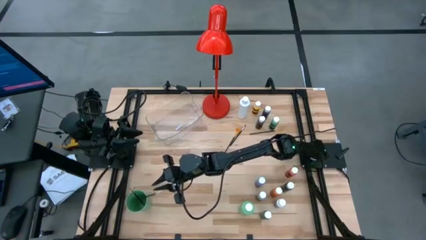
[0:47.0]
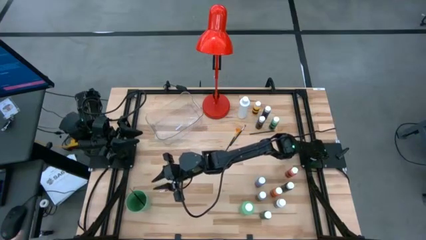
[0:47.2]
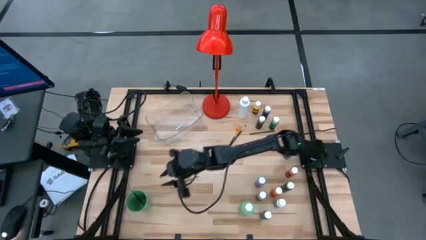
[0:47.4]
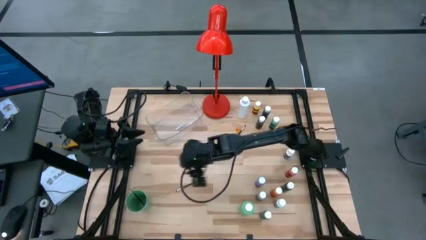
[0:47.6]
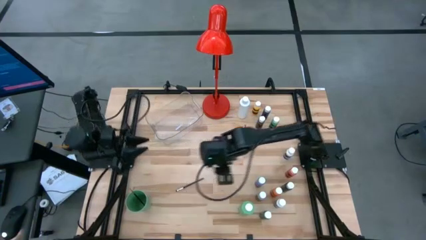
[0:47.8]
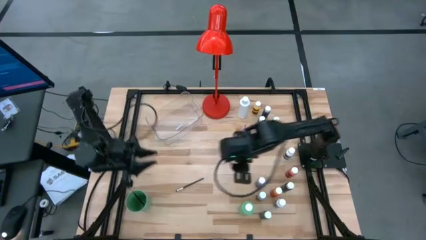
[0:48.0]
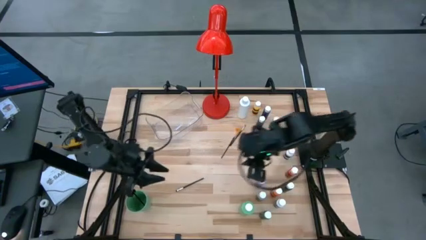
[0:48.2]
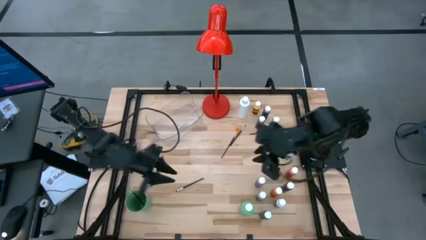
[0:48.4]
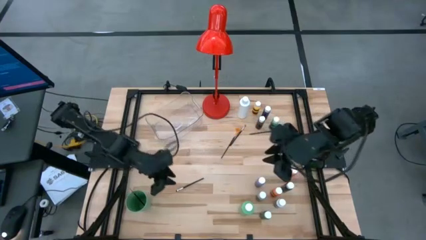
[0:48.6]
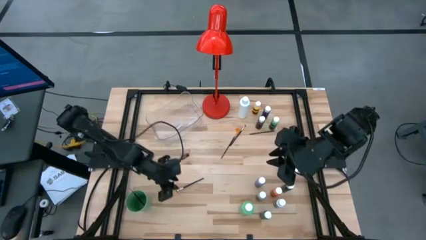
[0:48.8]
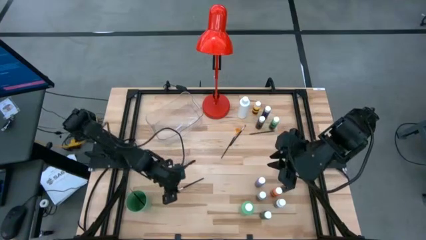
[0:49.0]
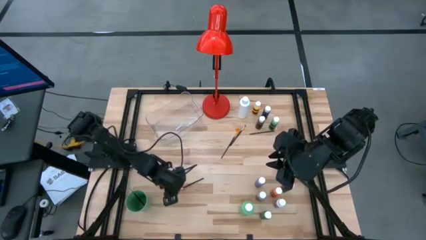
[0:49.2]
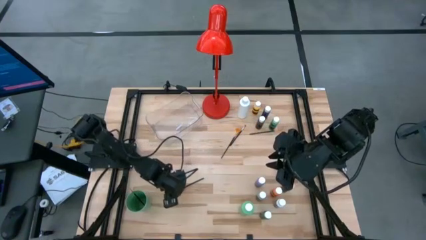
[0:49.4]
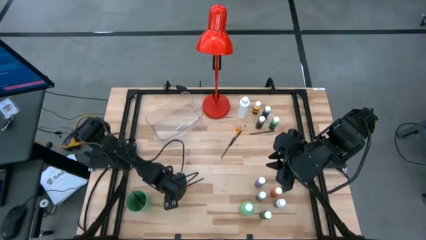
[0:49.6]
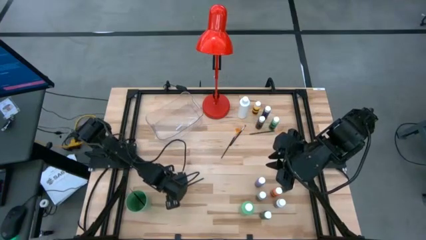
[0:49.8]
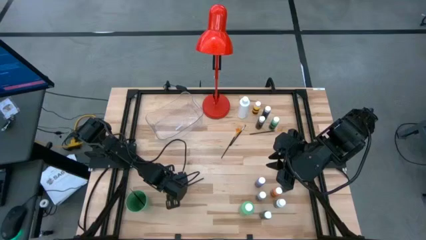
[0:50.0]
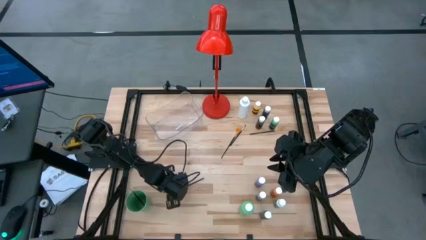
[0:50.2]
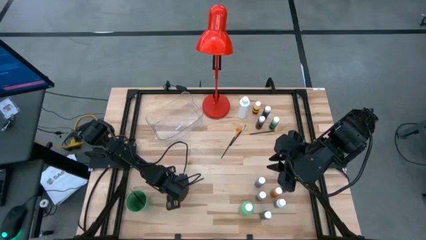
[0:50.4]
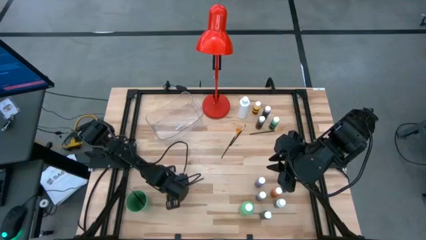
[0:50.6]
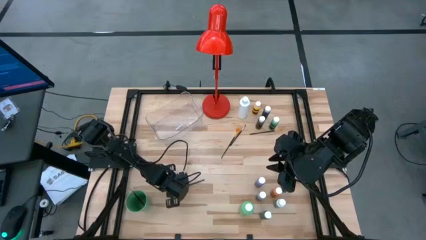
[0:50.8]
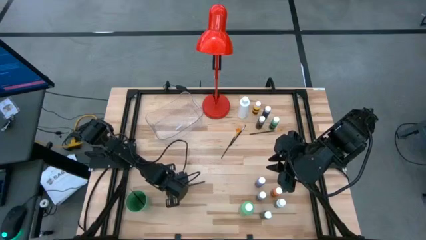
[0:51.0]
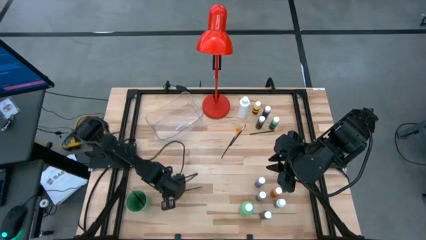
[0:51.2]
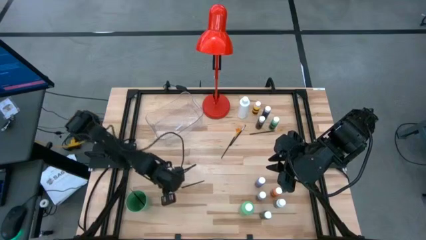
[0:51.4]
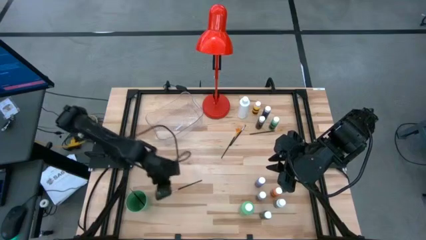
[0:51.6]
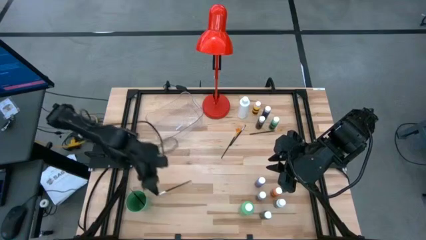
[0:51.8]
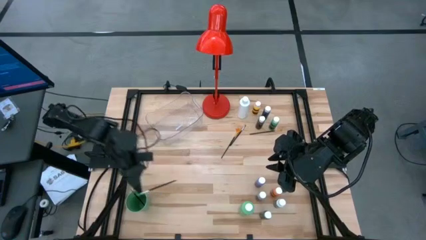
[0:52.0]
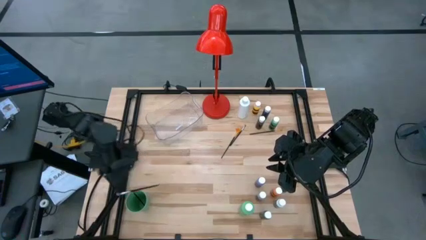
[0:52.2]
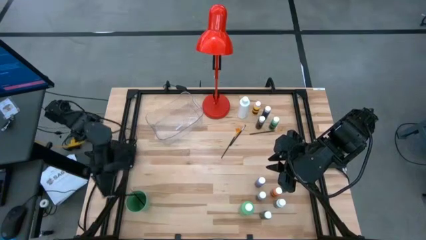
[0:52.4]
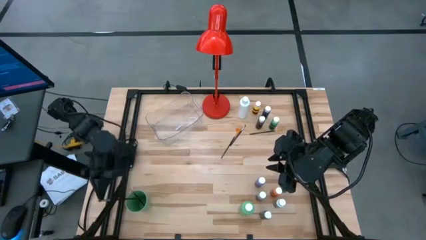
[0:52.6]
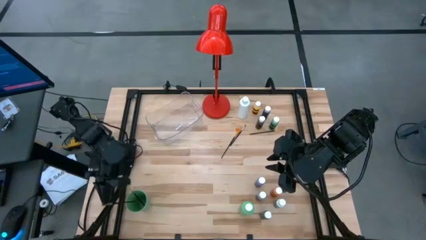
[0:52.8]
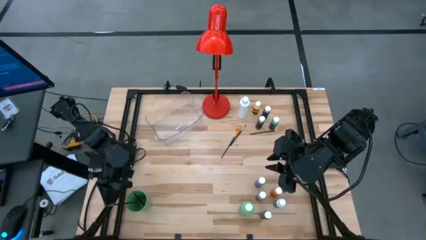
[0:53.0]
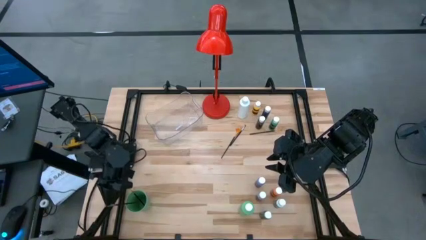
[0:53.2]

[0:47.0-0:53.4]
Task: Pick & Place Paint Supplies
Put the black brush into the green cup

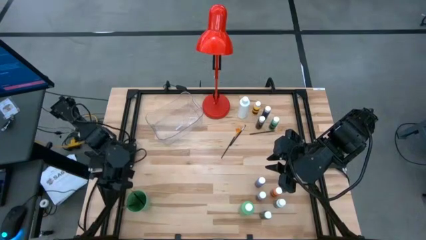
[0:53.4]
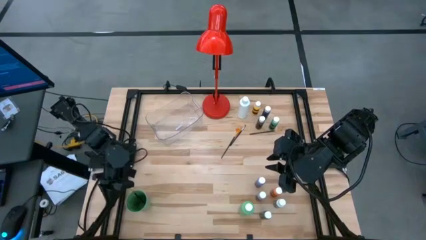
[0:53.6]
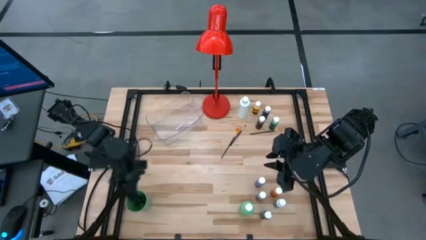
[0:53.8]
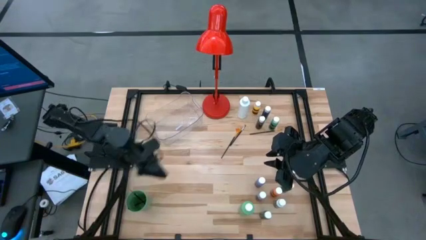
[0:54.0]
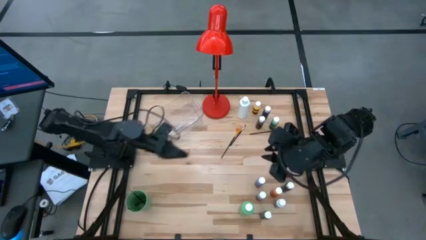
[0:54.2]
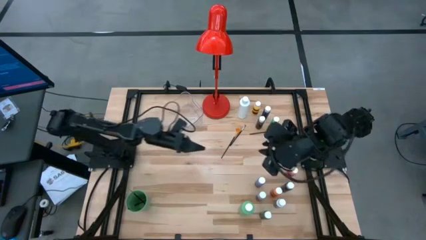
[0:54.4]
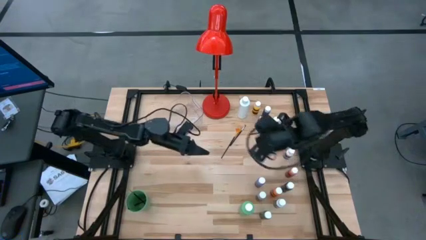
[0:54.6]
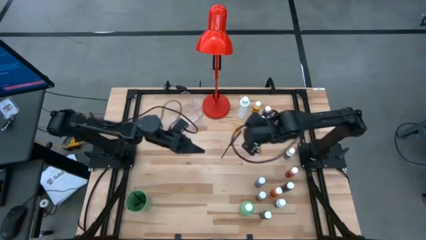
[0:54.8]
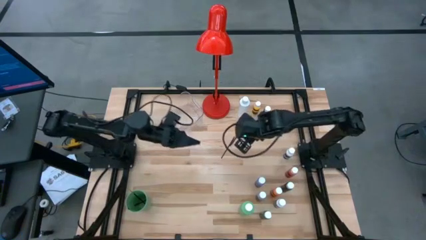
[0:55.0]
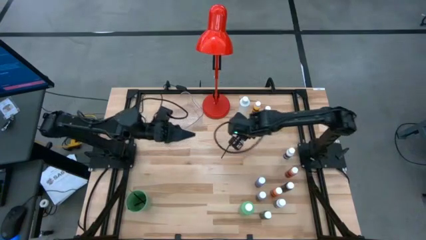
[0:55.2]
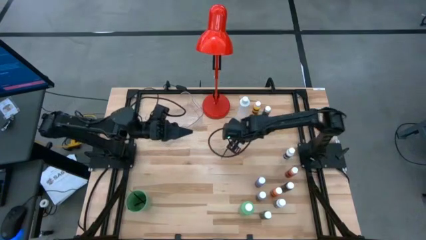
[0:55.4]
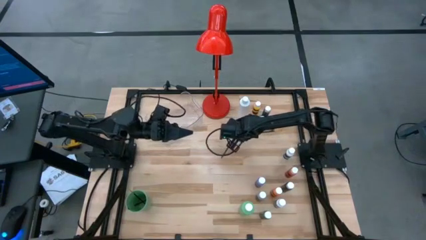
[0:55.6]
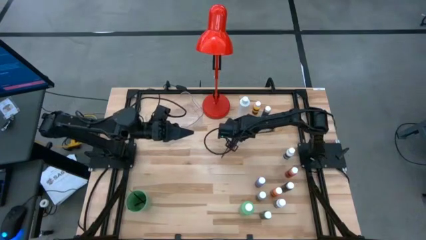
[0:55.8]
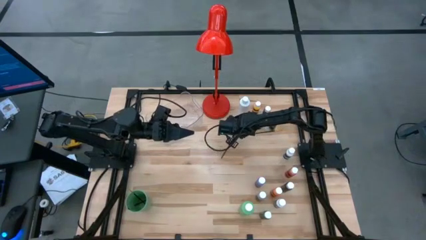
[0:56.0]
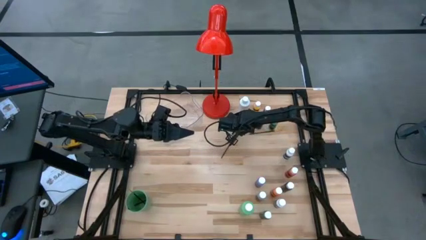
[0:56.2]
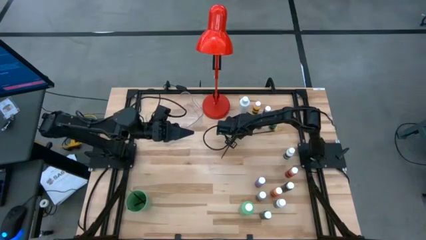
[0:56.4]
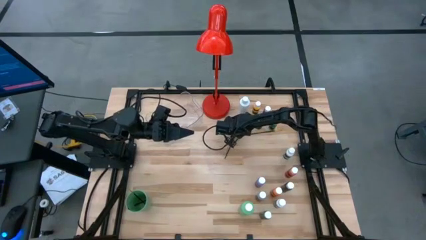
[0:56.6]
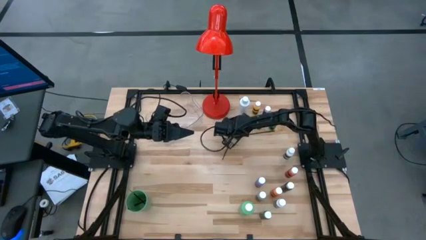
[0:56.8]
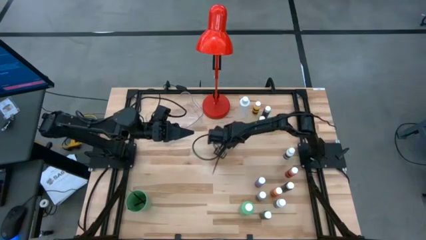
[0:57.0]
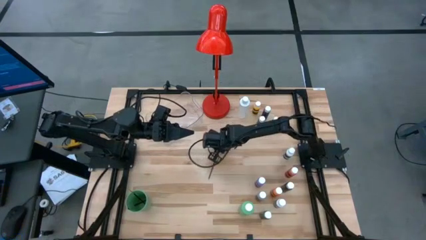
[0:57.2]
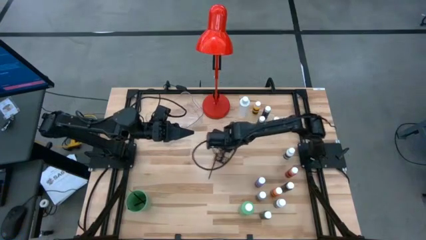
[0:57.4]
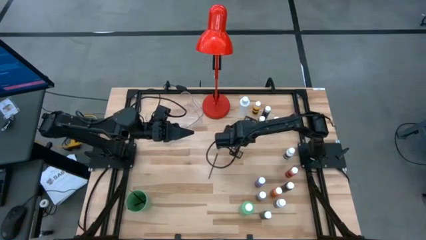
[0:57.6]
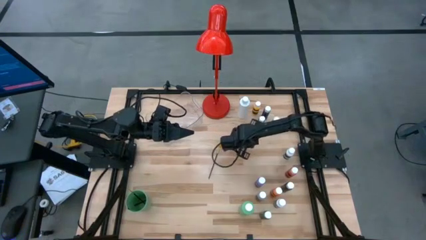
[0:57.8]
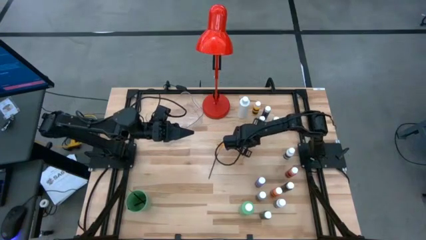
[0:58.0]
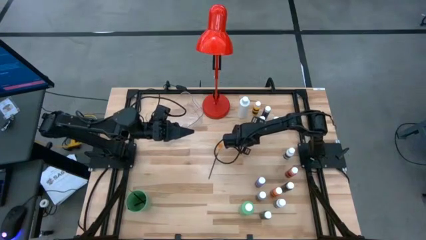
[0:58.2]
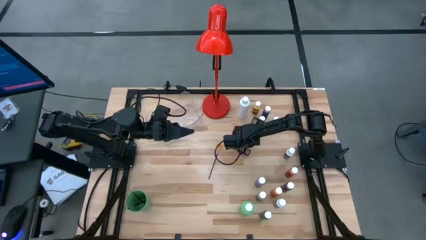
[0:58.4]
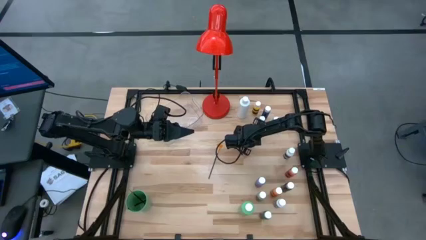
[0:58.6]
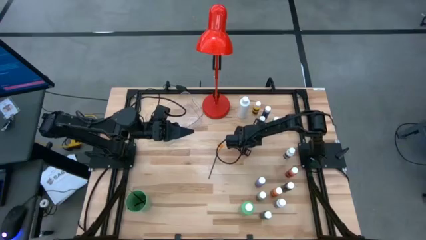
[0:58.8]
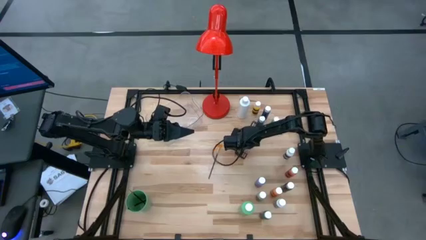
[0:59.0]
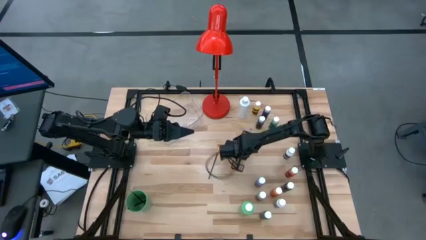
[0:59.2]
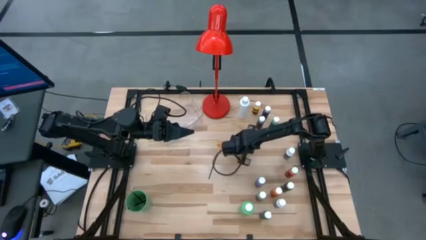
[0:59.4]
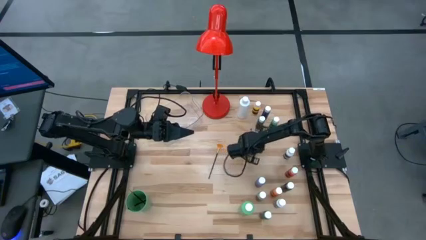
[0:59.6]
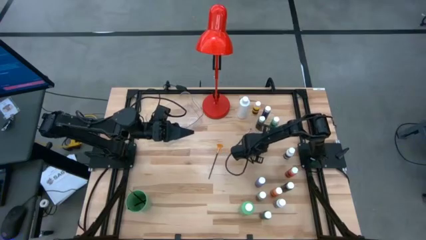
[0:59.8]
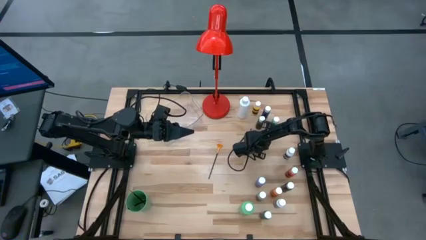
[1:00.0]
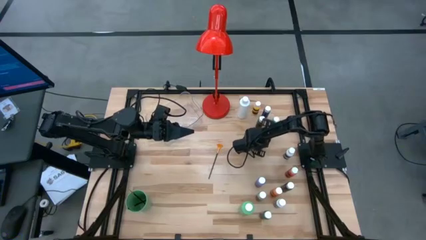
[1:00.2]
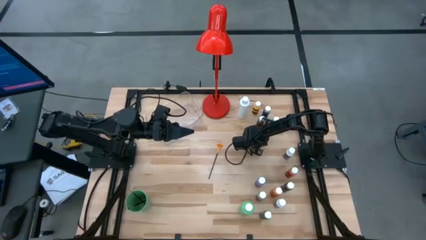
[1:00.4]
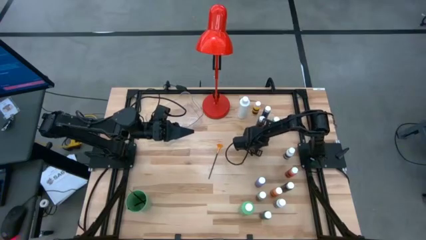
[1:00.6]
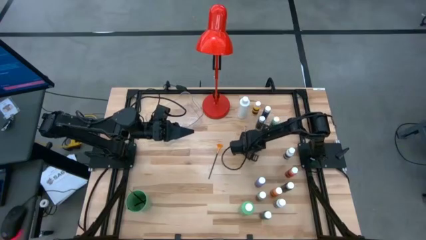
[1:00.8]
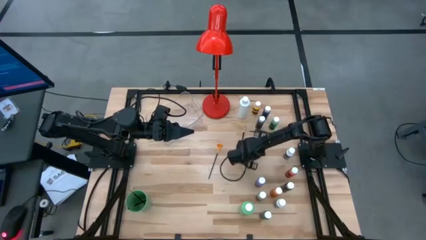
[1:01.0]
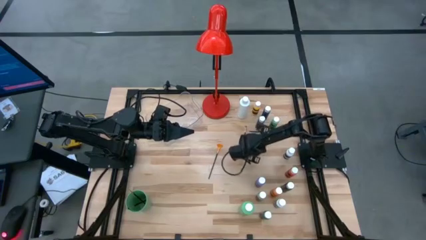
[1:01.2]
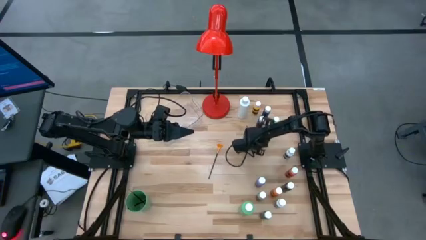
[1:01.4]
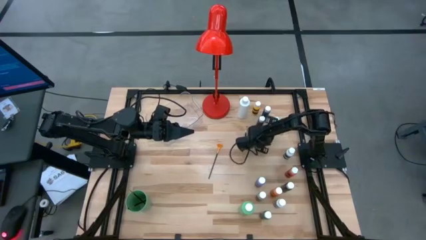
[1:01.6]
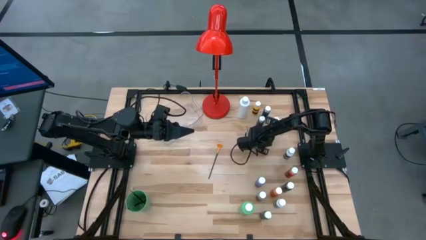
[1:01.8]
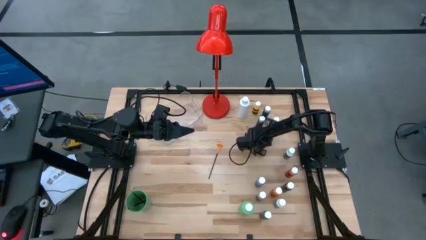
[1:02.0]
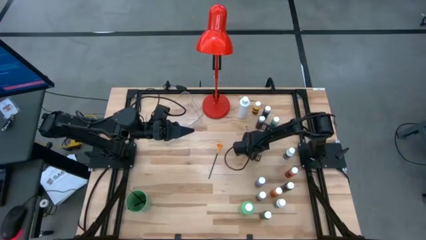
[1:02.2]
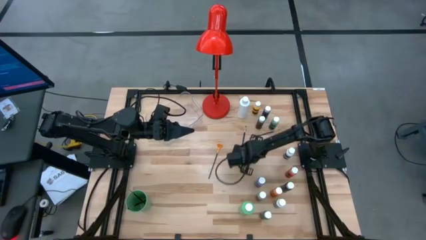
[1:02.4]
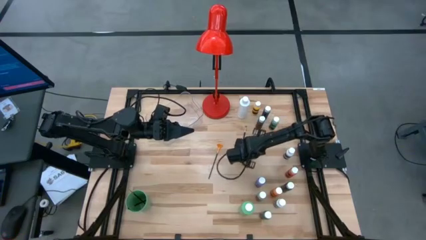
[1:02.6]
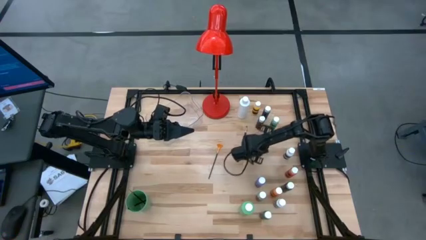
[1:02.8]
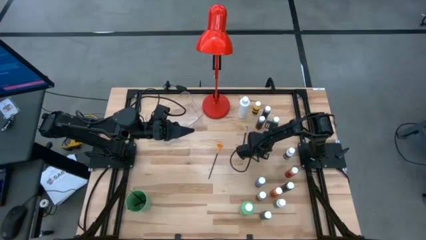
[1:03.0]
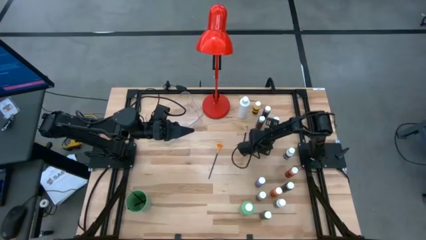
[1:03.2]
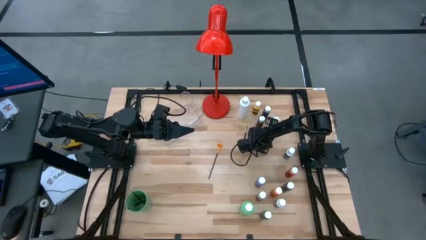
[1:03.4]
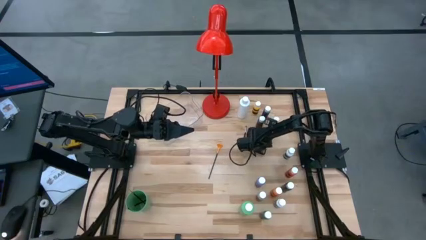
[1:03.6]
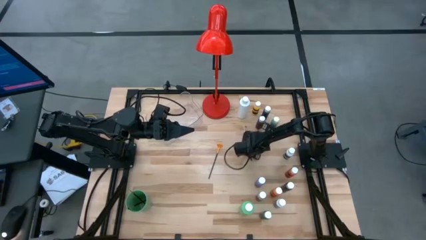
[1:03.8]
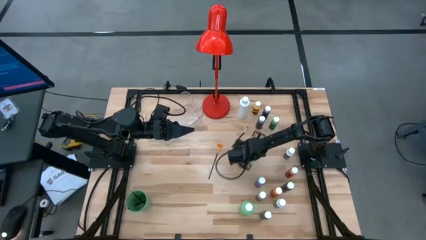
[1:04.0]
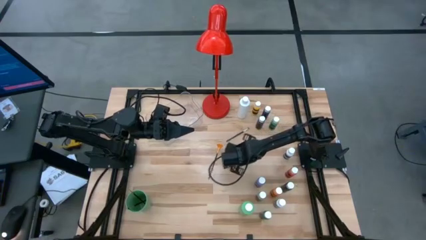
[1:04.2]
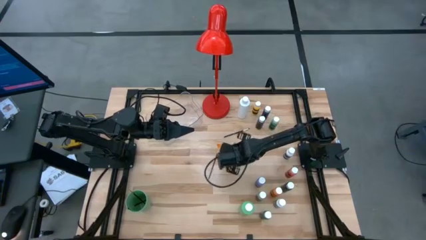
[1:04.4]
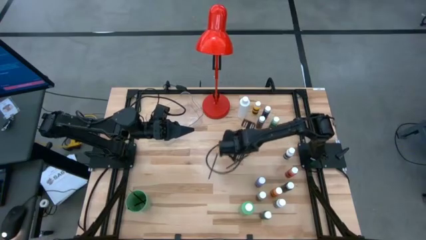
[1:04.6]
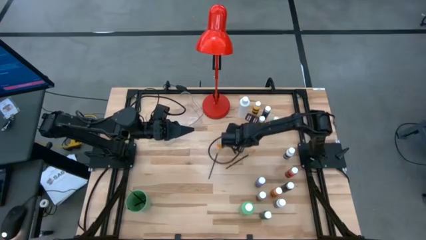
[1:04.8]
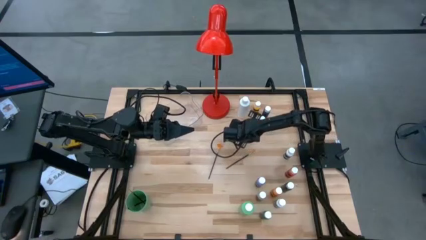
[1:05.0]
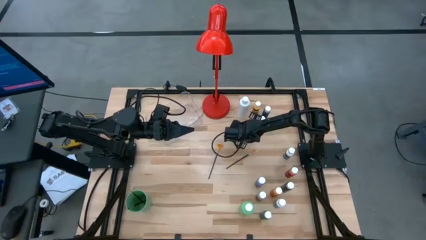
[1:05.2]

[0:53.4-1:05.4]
Adjust the paintbrushes to the center of the table
